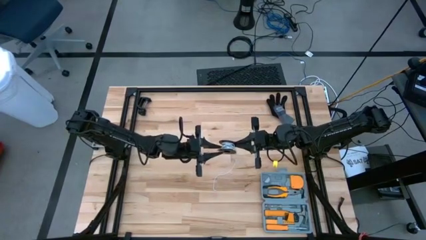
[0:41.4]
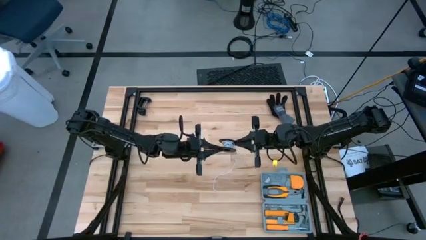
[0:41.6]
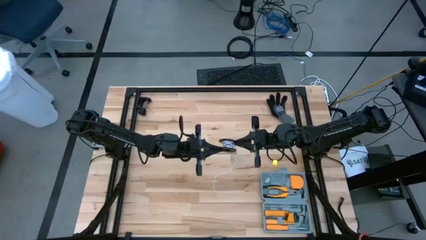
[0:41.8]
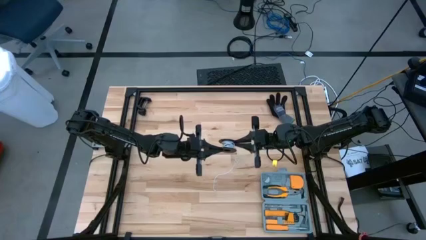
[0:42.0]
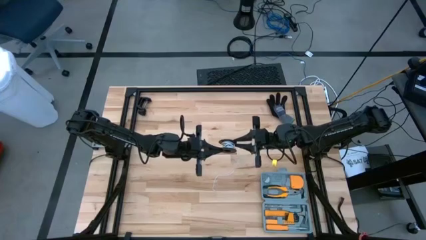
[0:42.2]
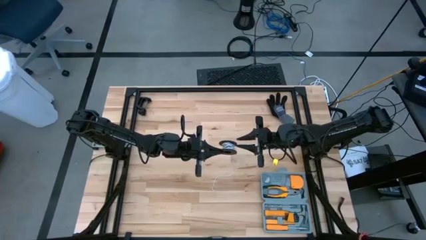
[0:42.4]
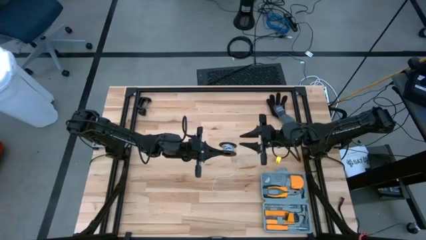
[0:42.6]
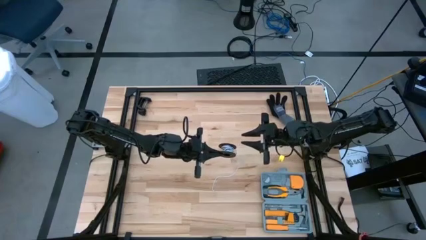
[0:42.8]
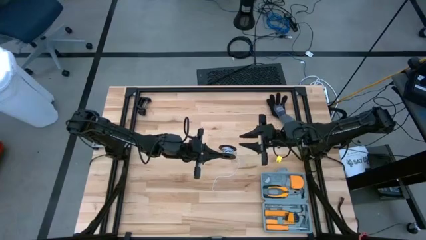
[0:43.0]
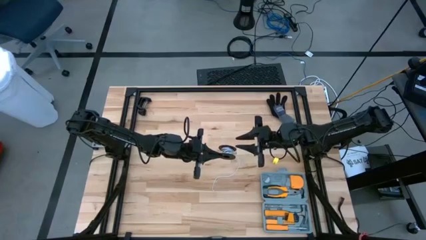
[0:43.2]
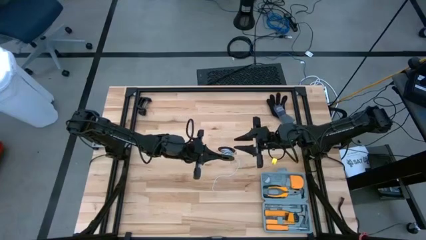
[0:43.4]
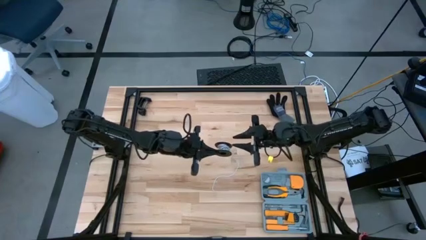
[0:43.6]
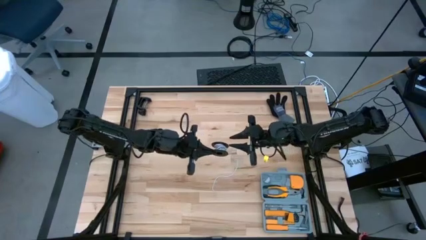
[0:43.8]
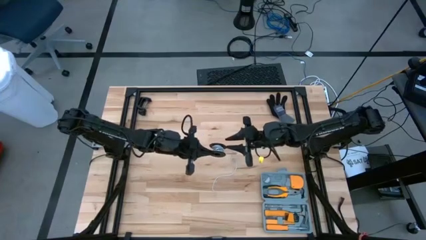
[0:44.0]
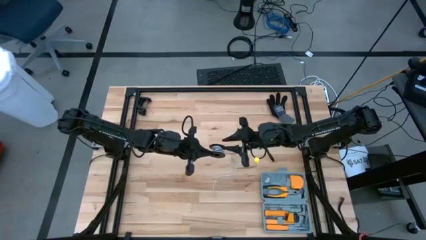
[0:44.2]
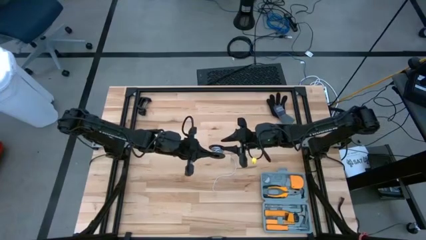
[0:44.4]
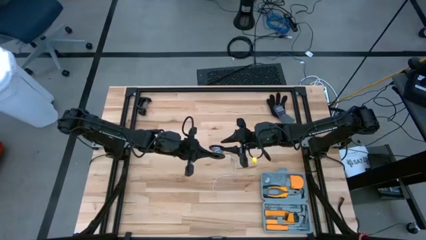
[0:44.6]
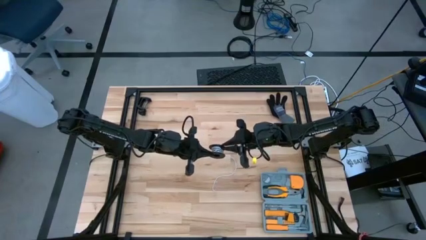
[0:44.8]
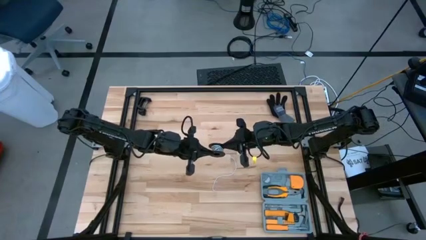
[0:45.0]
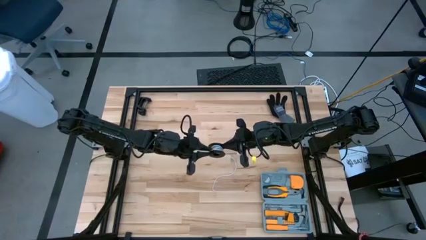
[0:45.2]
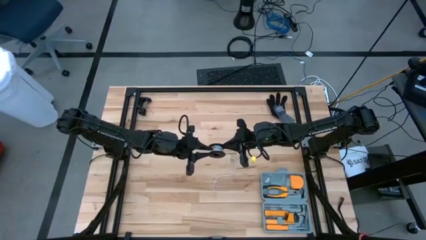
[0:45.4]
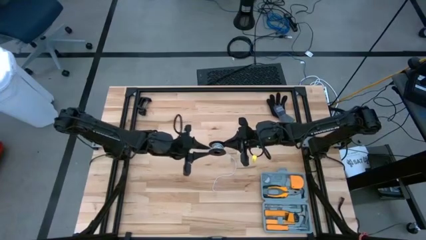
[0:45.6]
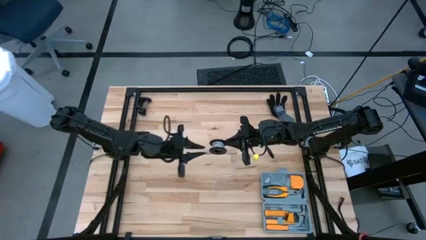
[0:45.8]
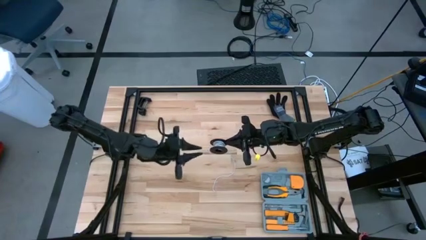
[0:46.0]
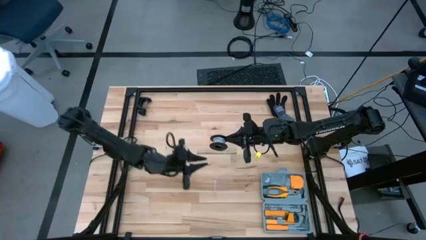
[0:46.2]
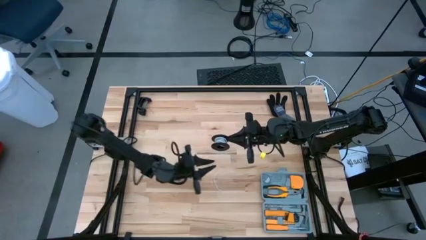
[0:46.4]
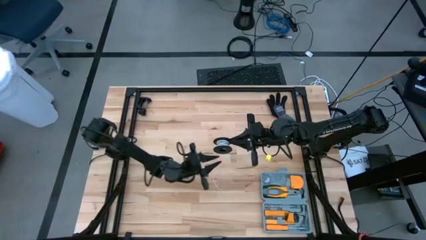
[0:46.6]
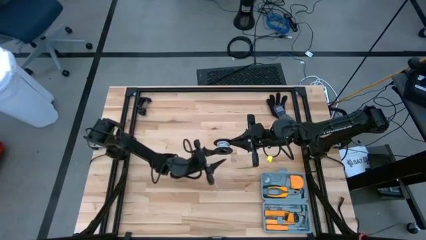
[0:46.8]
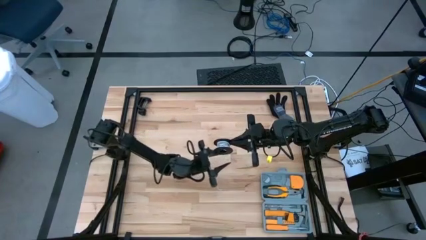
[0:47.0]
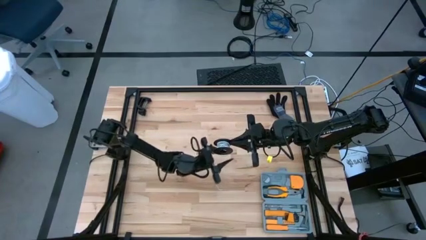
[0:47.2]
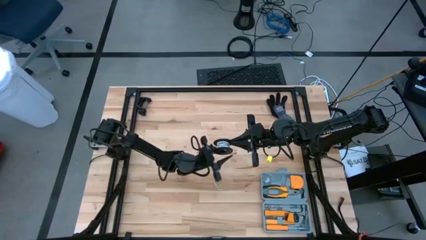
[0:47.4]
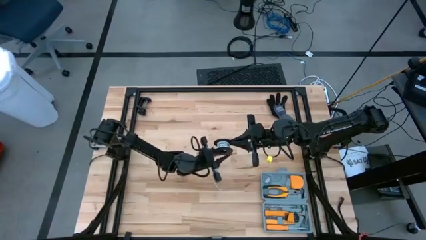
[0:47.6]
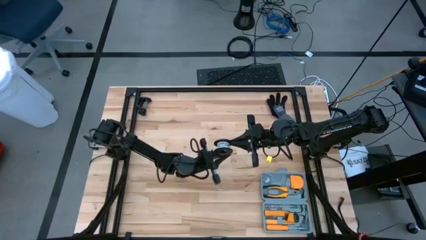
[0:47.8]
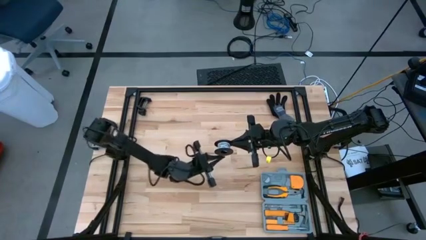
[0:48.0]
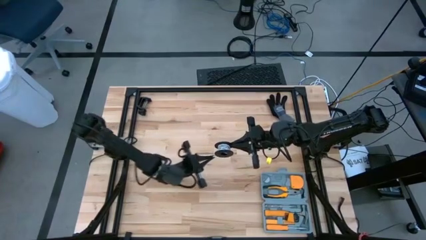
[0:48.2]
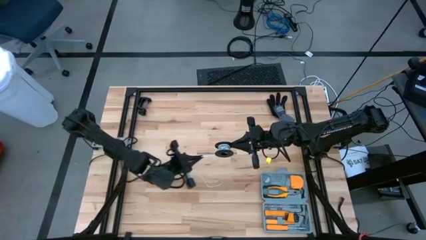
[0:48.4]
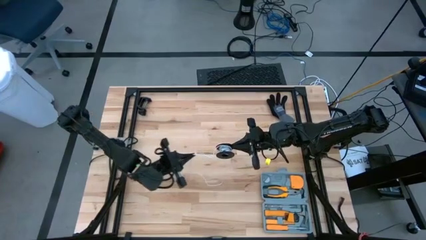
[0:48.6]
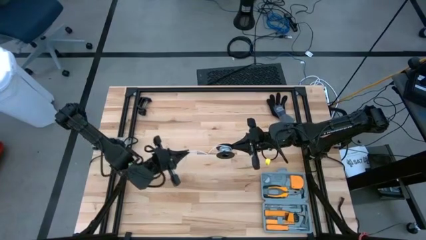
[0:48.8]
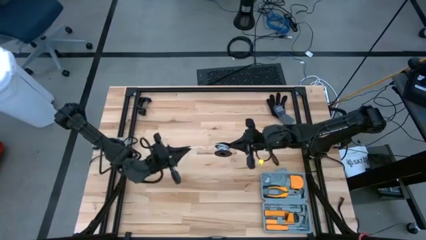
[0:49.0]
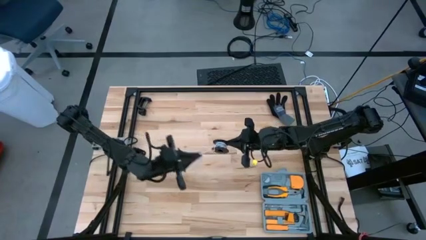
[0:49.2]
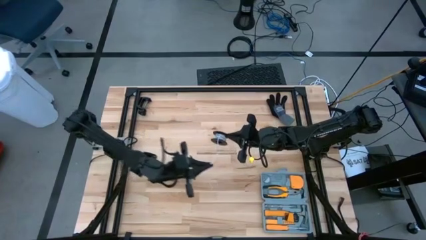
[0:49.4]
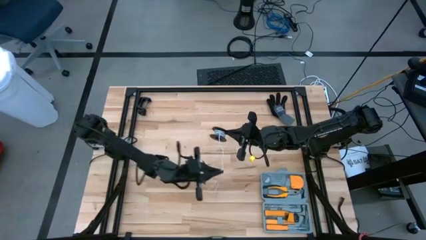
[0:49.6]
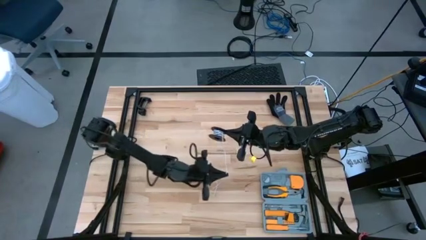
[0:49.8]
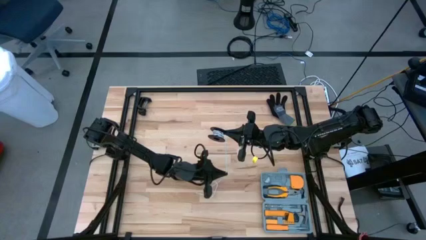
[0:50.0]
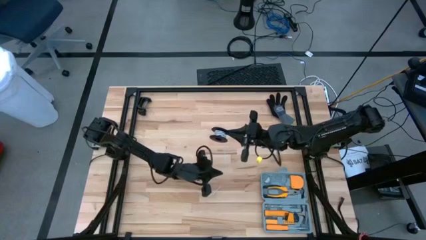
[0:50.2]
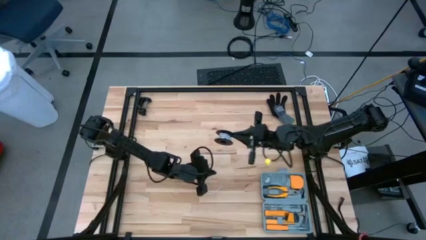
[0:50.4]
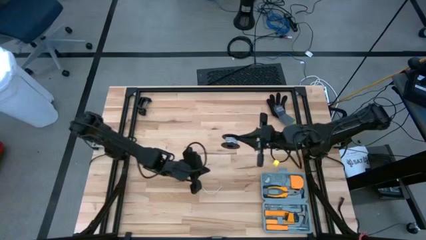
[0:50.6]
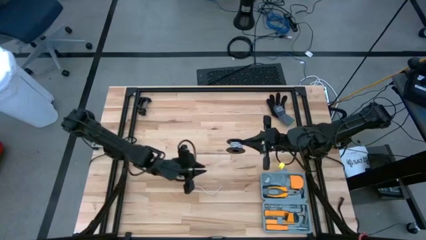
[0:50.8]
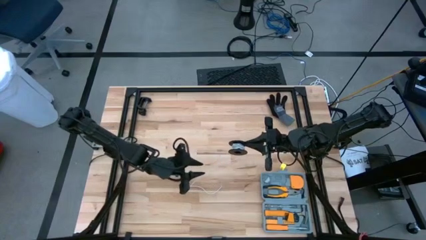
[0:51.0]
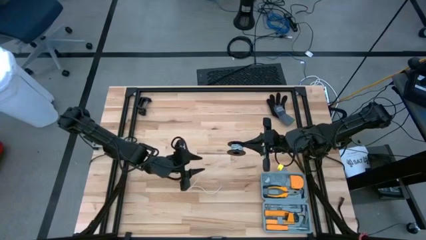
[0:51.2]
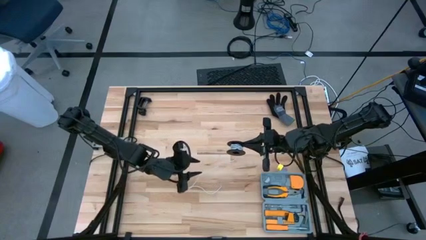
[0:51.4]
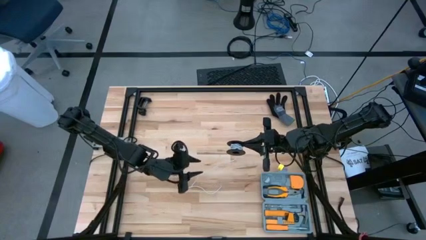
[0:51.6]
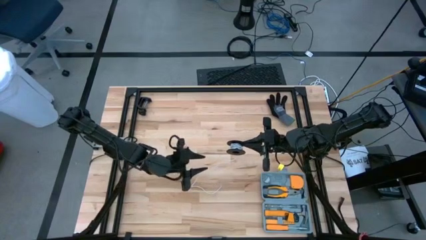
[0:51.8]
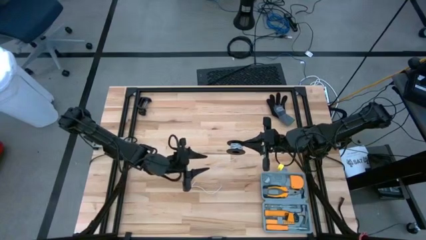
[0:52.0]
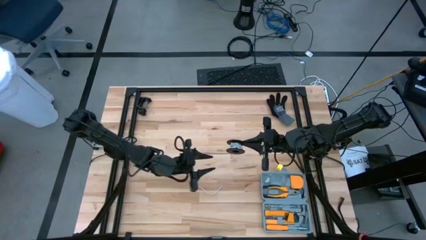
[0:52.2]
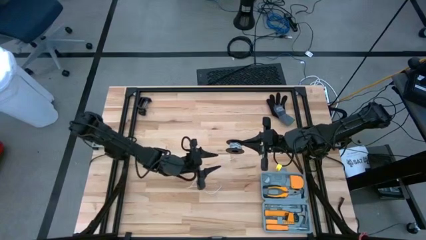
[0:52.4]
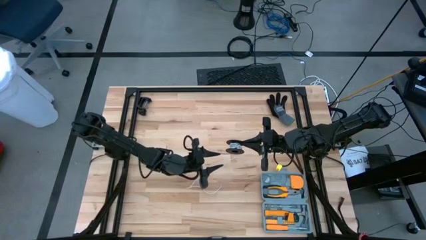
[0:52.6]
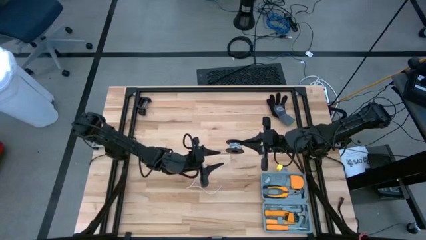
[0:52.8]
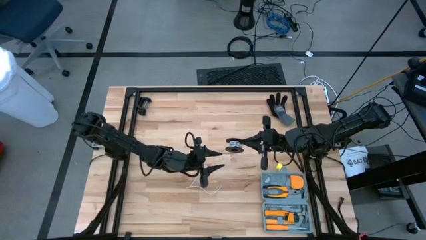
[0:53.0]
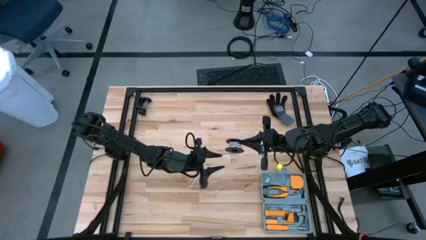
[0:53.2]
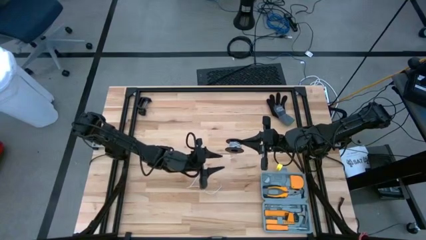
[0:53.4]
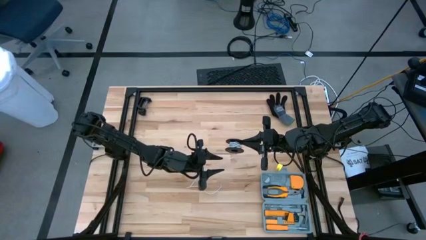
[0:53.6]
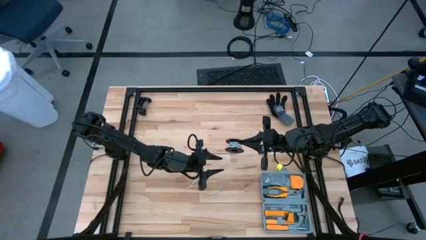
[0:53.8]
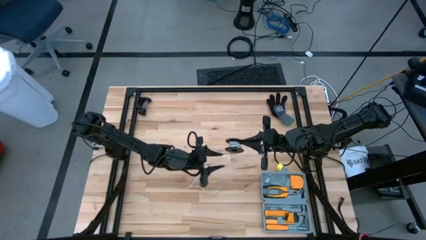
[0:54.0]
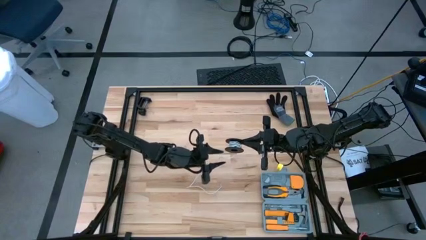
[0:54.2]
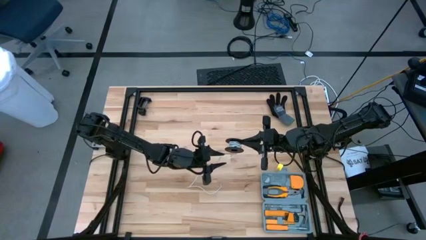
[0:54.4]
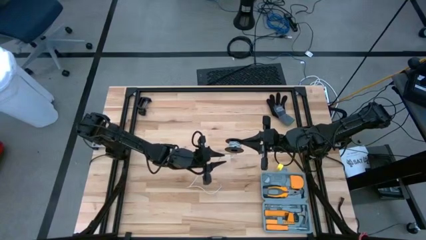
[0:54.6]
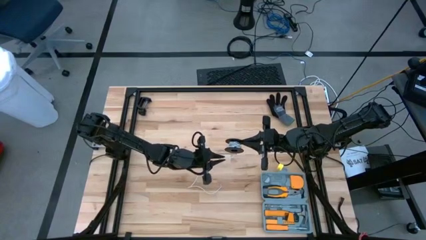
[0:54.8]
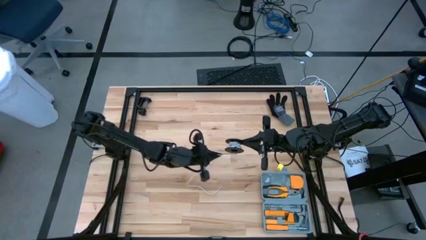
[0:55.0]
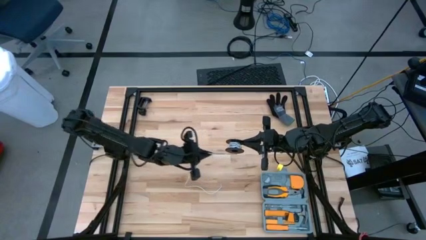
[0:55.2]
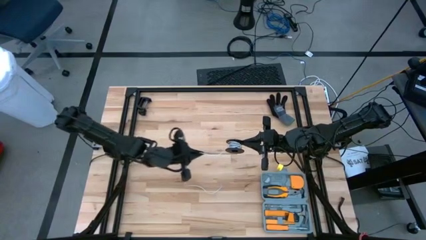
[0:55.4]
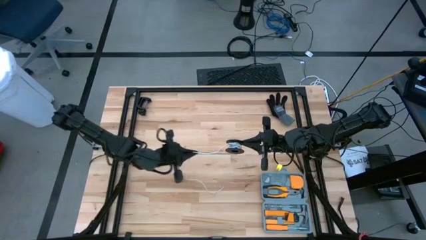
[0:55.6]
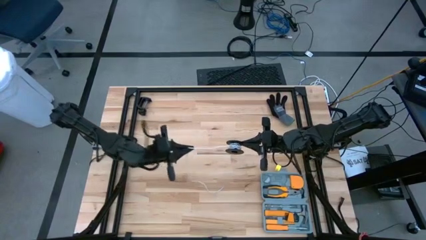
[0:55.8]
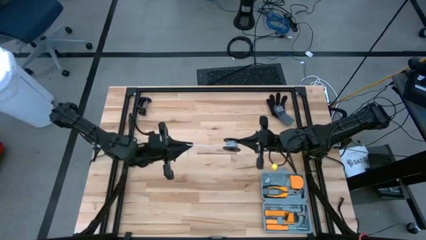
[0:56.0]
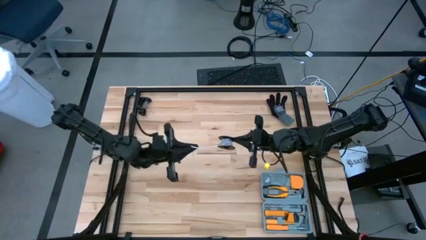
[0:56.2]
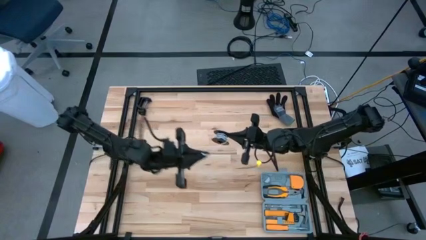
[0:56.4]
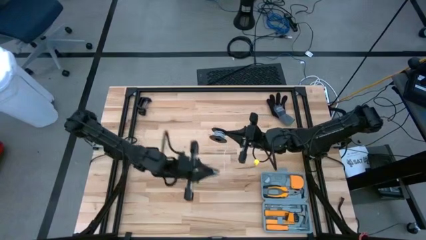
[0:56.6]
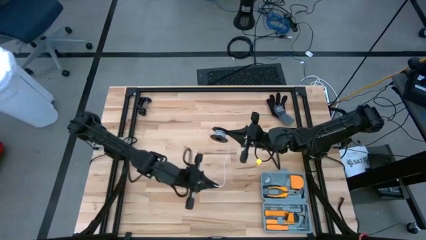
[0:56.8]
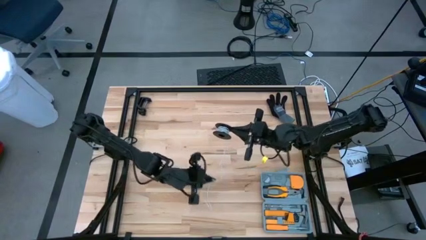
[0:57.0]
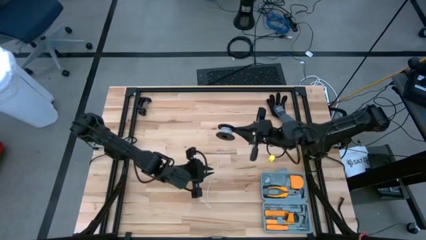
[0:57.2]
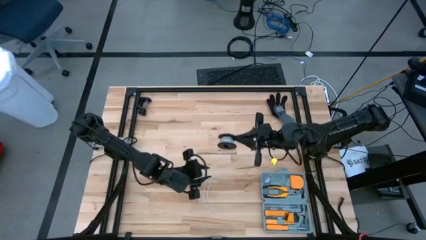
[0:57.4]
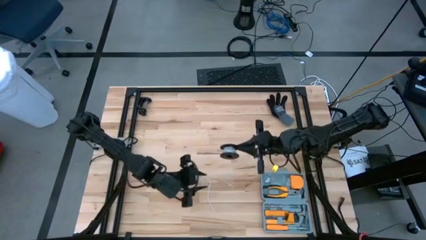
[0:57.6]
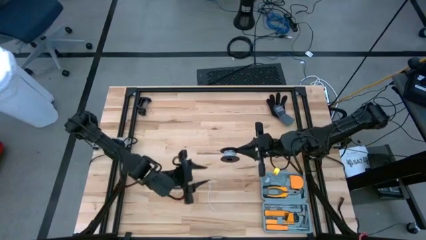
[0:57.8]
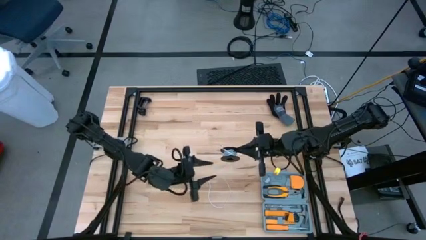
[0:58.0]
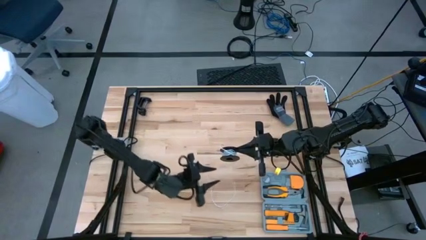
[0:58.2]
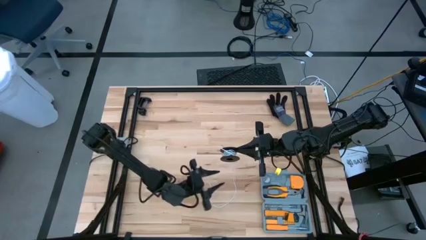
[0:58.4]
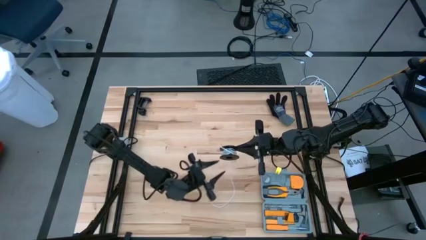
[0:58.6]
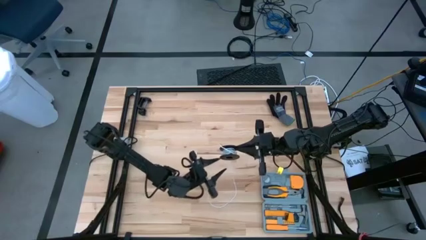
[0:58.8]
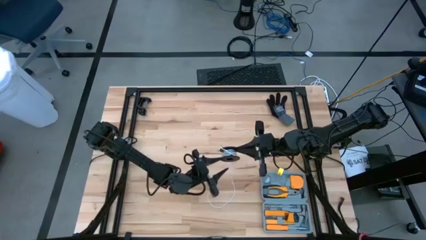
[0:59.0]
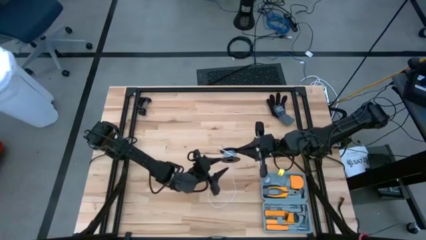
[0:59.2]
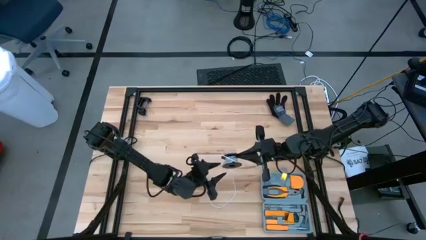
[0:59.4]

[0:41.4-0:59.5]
Task: Coil cords
Uncoil the white cable wire from the spool
